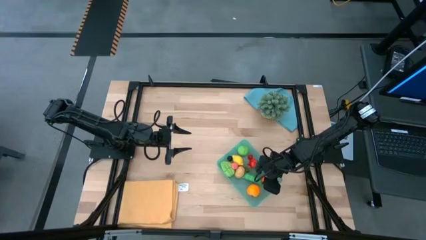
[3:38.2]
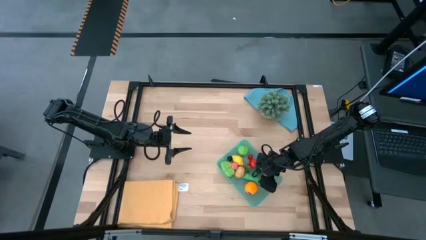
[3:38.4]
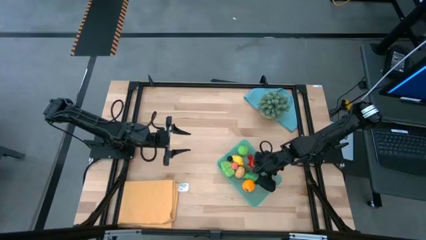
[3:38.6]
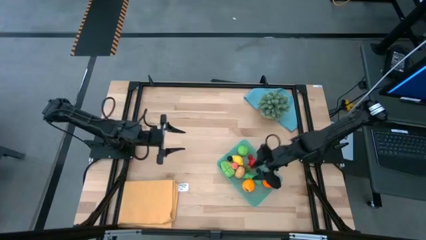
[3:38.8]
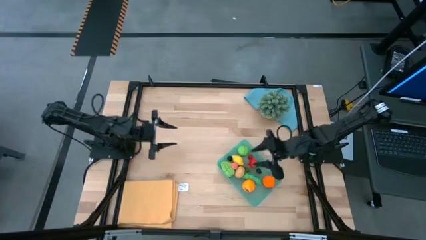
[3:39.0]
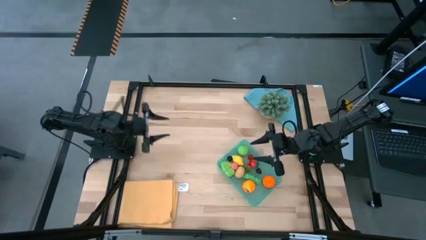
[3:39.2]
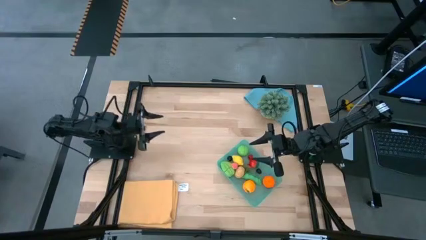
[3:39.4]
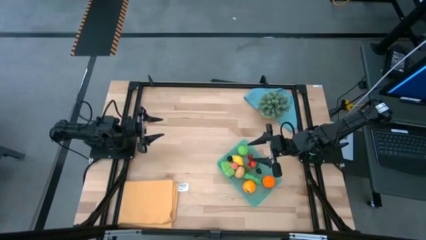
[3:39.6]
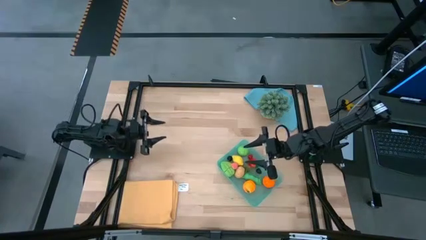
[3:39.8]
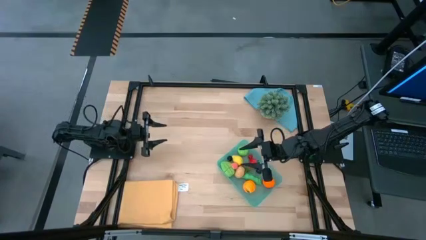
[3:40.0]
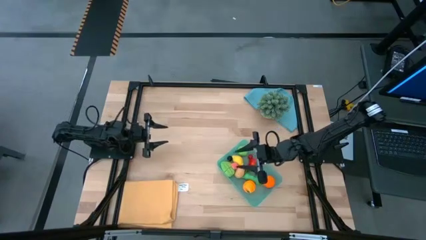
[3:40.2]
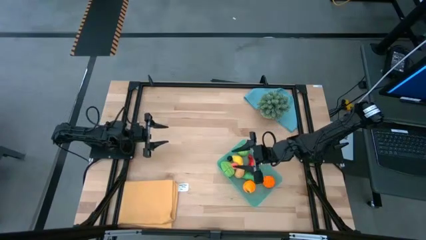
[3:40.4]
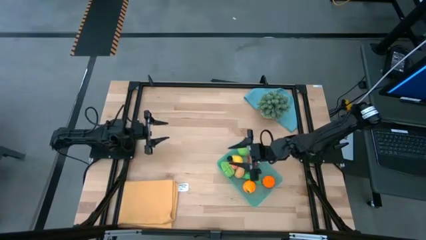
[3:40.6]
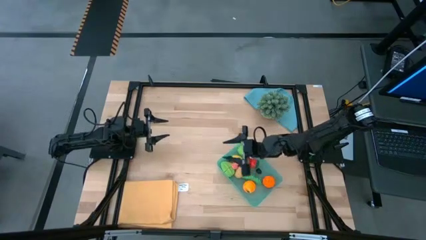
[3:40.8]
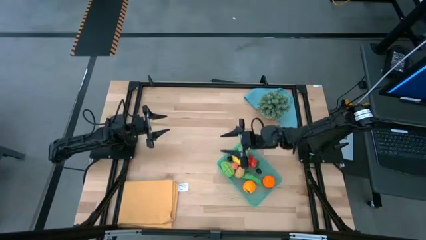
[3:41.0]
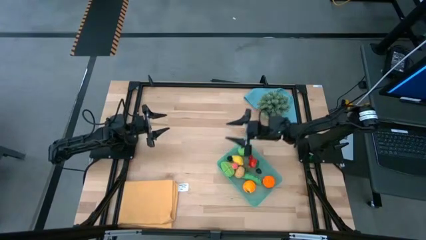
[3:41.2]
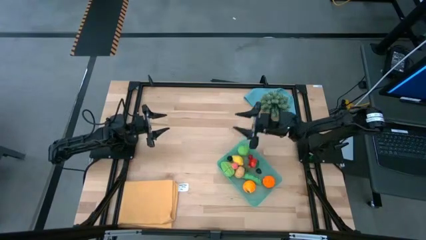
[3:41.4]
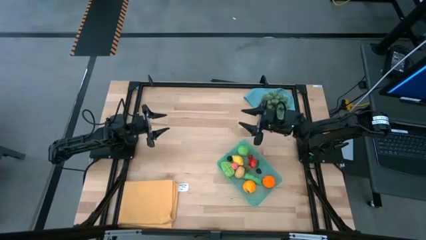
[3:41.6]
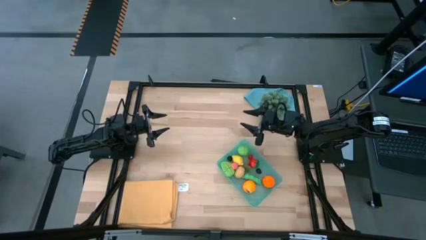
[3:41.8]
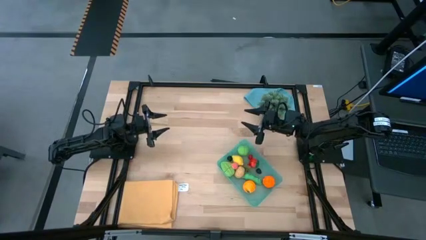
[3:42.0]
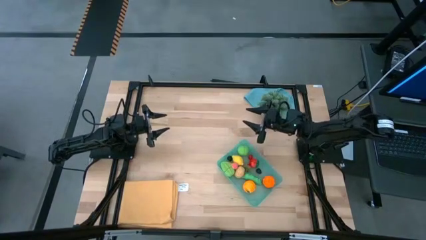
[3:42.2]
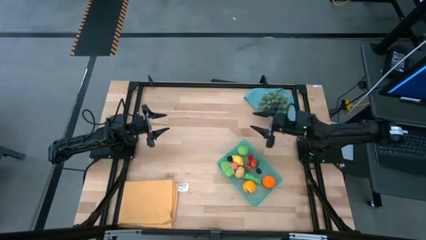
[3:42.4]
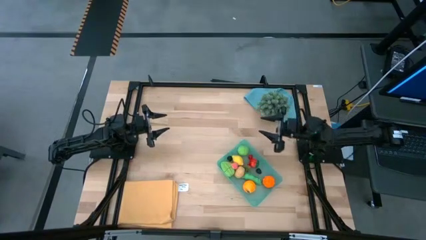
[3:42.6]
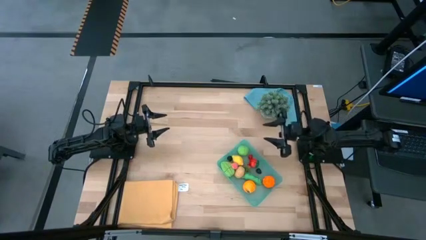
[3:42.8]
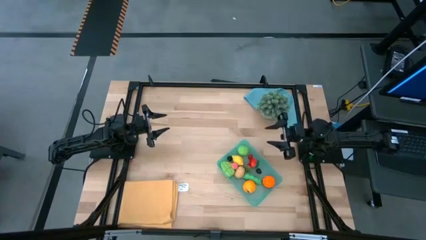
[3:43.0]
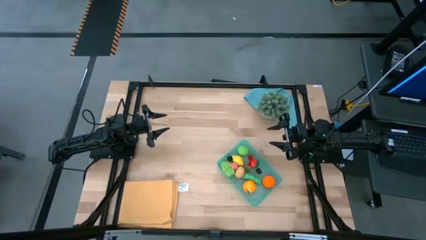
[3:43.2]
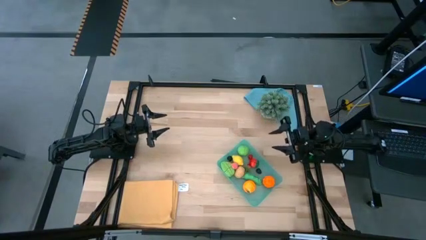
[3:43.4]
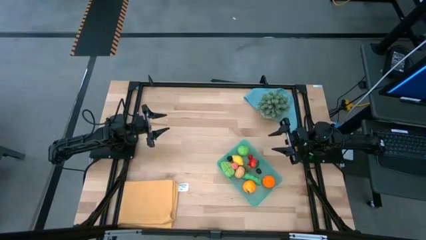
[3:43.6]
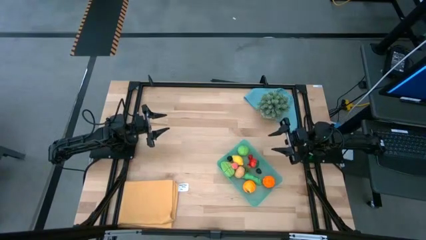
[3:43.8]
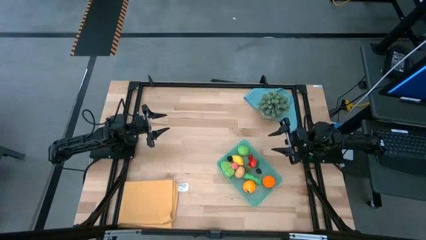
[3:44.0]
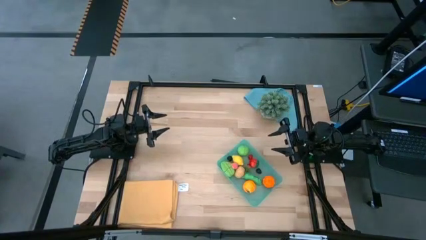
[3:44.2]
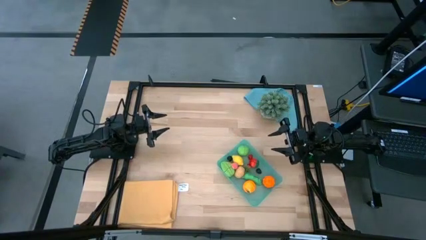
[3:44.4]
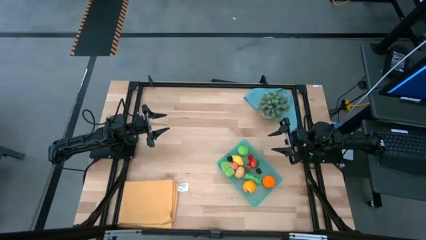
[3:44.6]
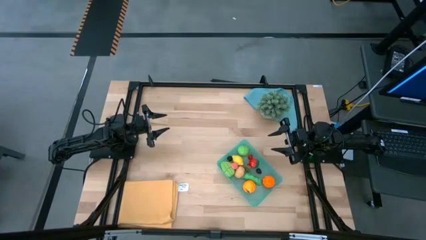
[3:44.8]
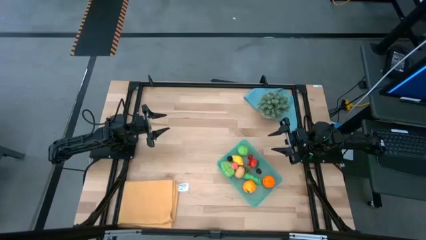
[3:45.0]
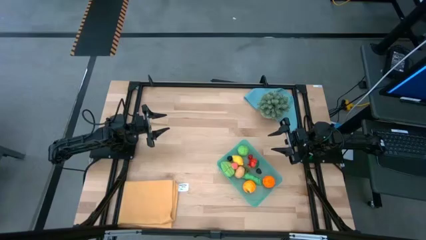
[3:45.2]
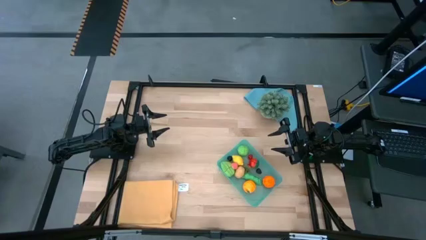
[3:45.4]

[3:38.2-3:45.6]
Task: Pick and placing Produce into tupperware
Return to Home Position

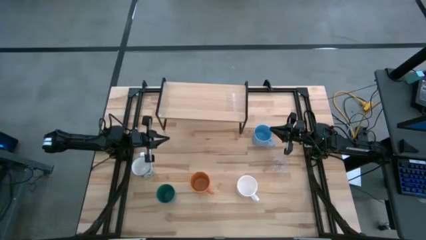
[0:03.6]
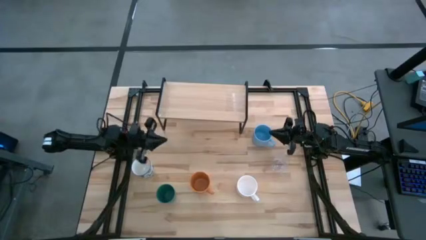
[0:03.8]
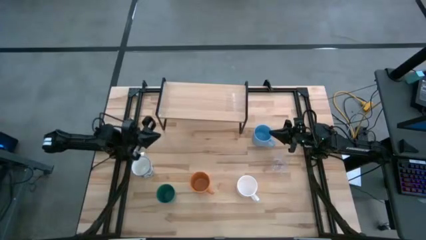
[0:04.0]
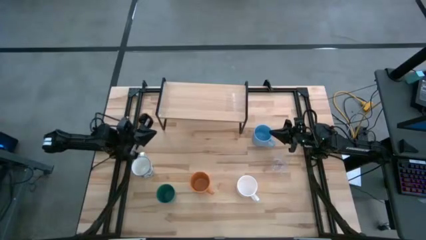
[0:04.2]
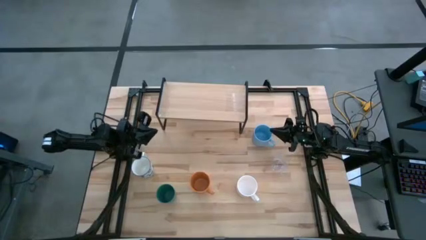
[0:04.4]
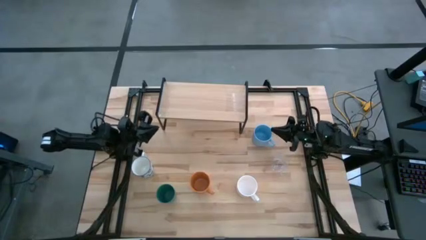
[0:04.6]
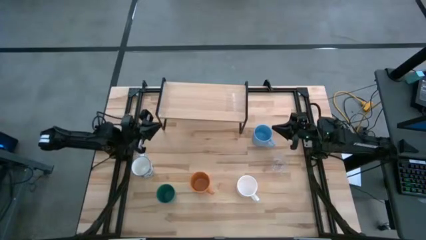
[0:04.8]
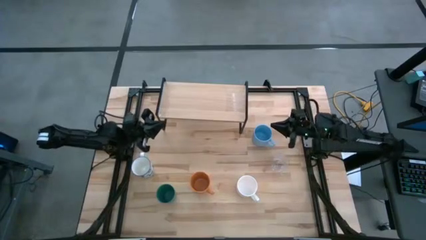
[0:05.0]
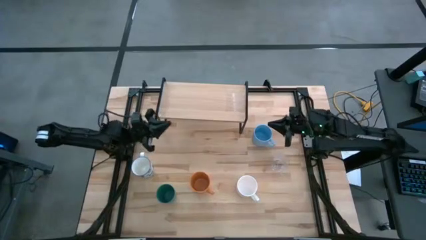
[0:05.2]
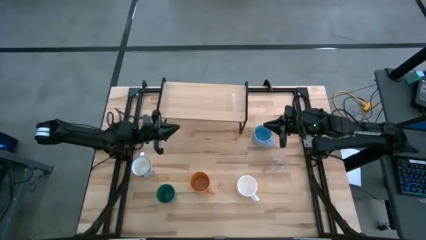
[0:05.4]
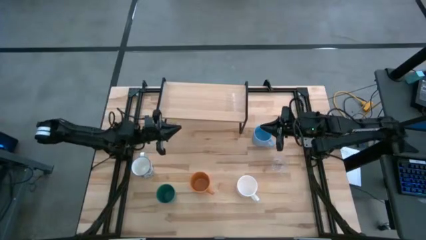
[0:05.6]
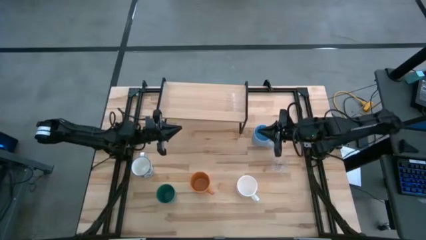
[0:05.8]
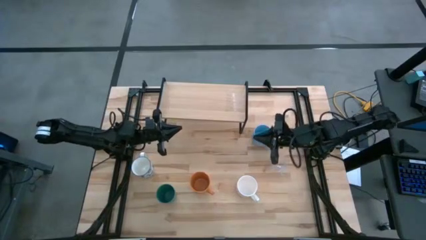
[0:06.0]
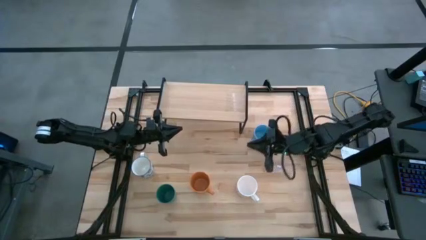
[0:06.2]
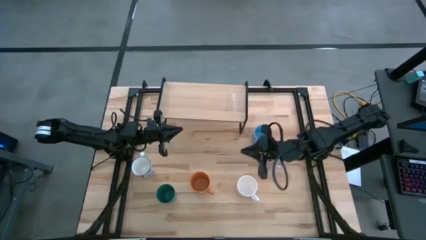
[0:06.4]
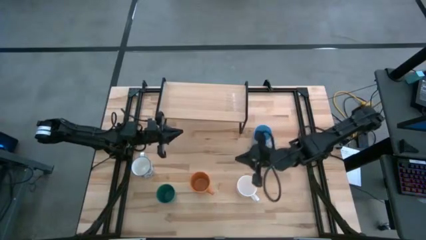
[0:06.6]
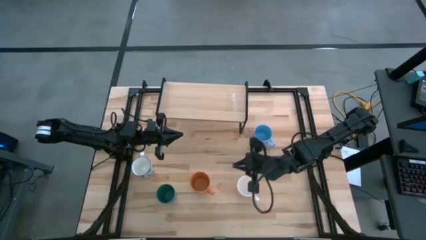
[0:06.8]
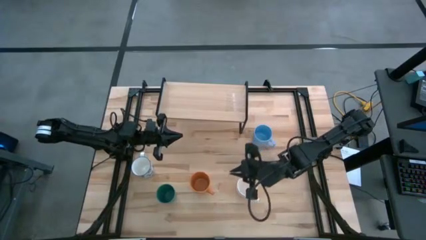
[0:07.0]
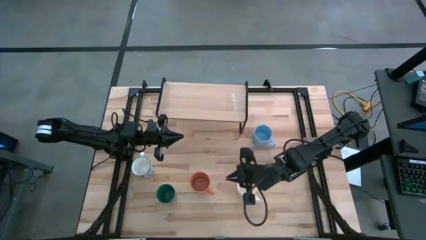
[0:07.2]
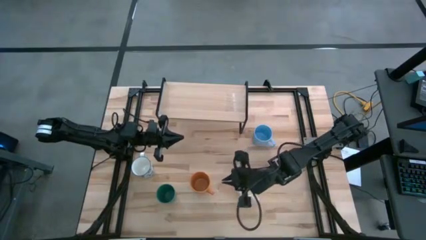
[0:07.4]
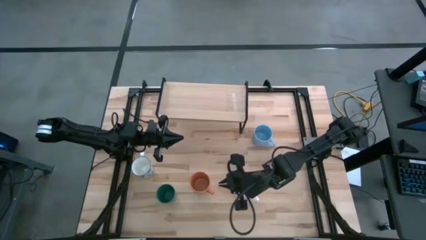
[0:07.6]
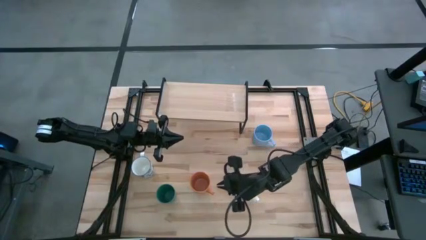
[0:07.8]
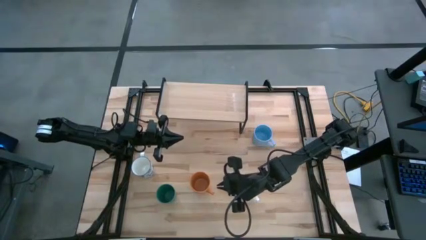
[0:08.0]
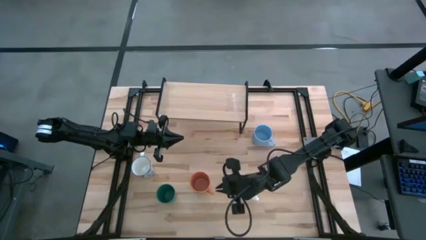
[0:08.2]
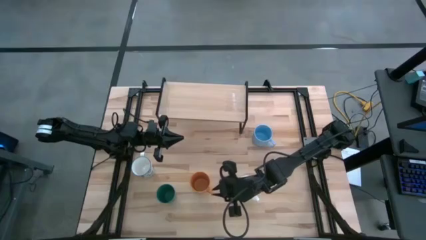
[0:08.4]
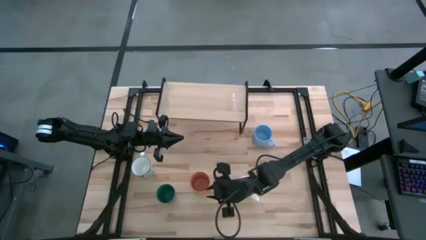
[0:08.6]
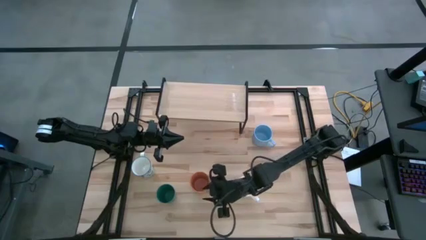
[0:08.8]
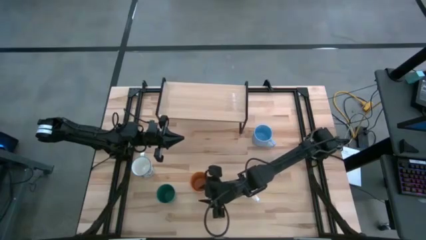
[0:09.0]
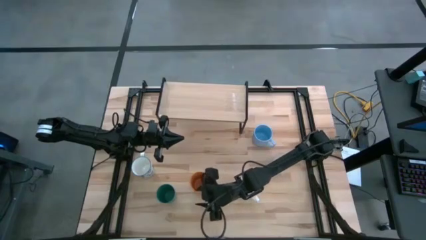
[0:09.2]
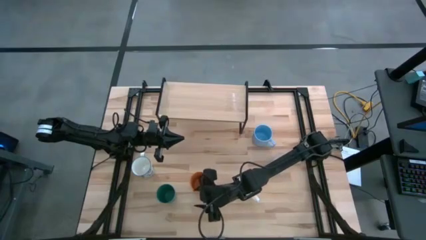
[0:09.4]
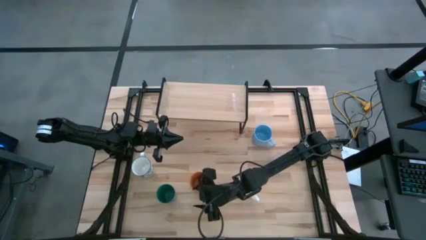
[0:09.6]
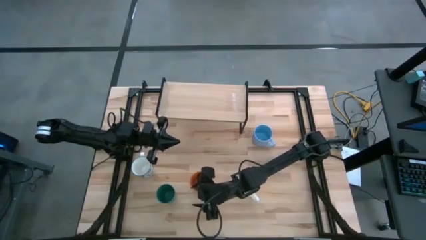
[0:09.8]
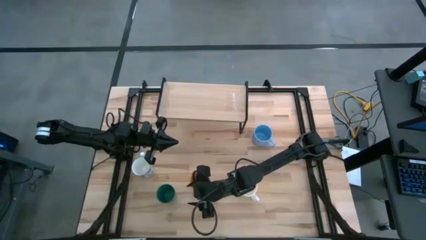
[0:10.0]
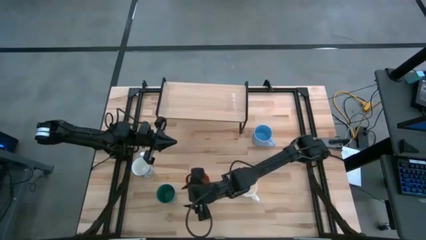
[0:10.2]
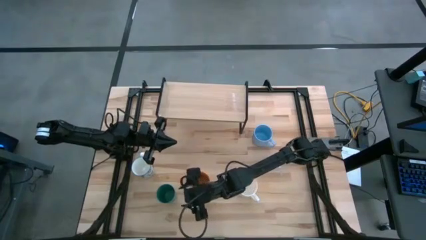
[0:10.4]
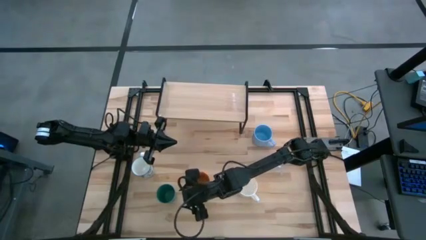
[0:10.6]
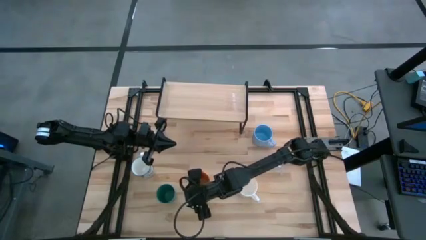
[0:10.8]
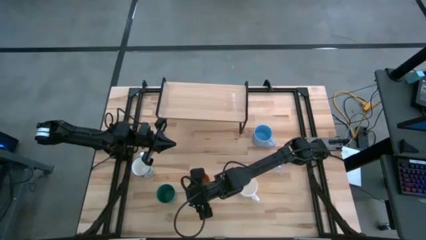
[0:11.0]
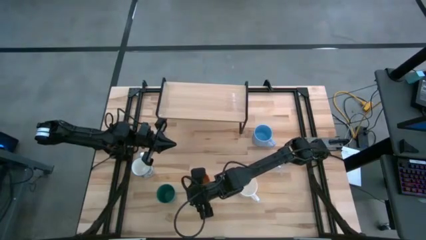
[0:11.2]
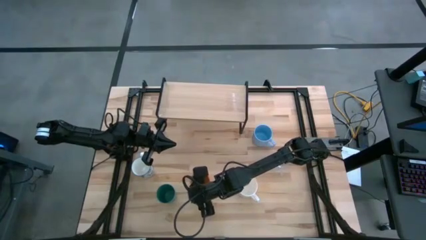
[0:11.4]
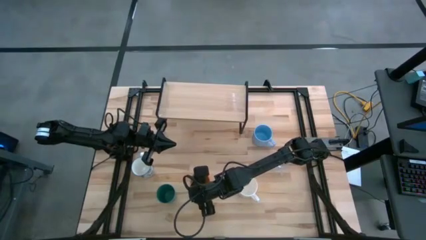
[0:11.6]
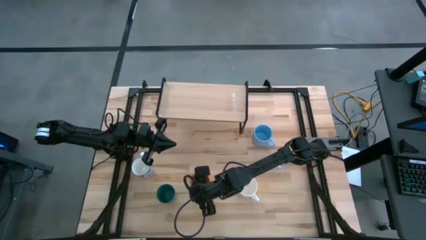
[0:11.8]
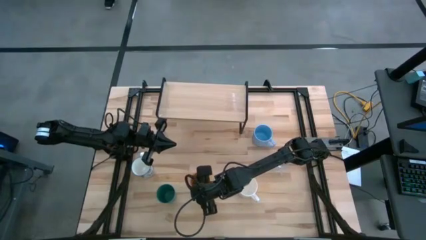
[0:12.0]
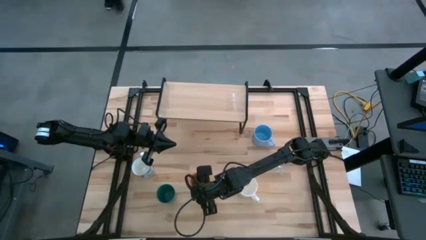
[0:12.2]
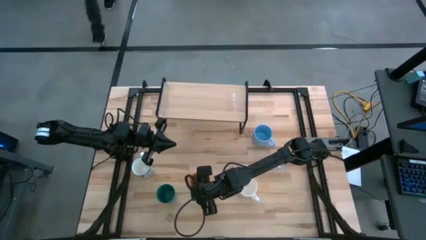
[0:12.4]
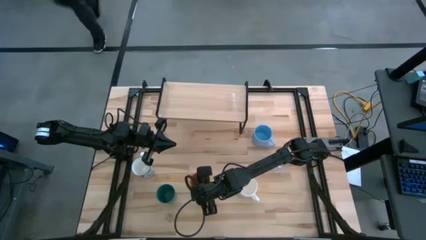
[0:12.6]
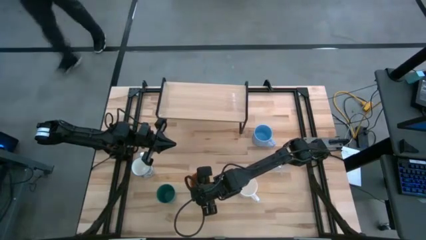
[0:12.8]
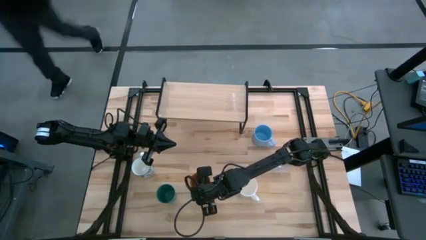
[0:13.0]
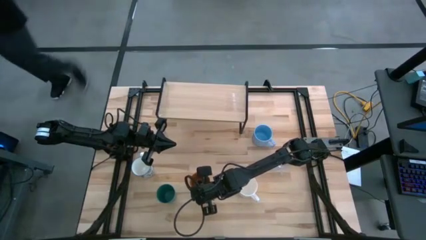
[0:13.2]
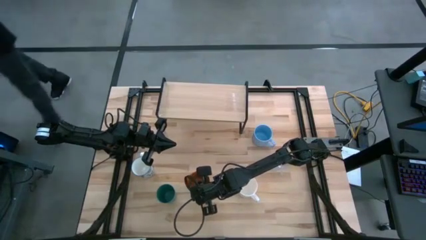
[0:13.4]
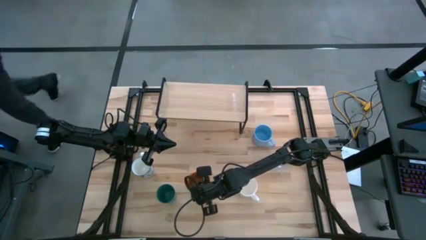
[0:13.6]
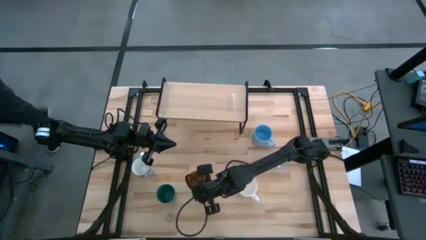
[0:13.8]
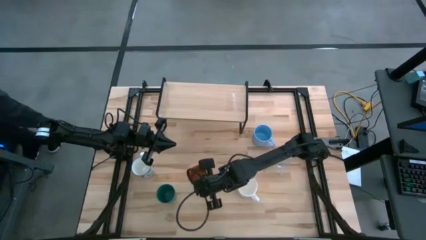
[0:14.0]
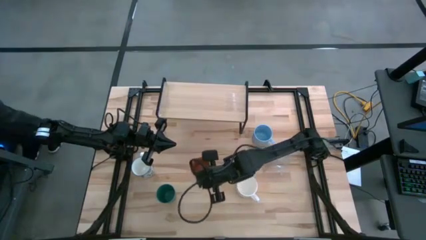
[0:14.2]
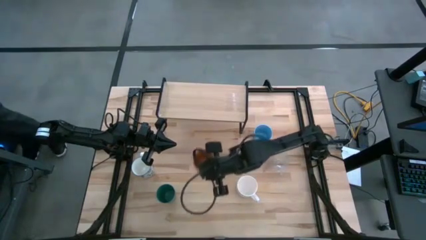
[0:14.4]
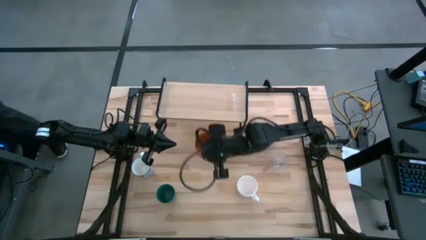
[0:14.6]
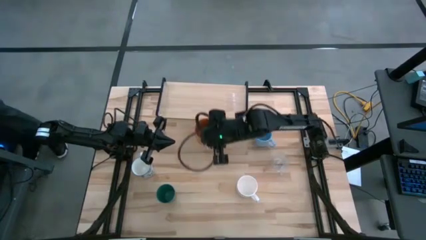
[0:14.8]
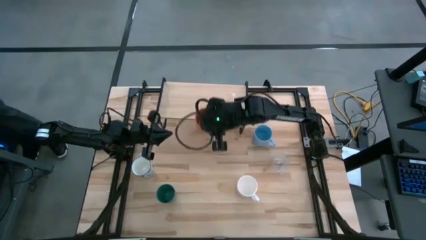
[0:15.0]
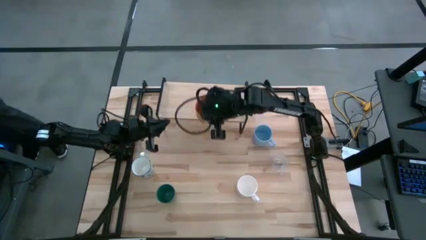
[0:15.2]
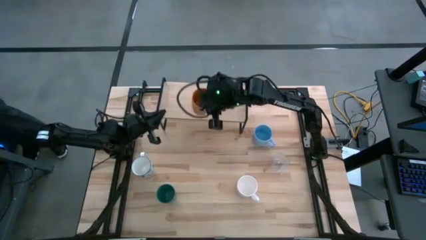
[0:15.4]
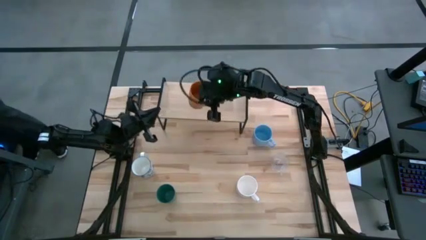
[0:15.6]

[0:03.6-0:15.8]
Task: Stack small to large cups/mugs on shelf
Put the orange mug on the shelf
